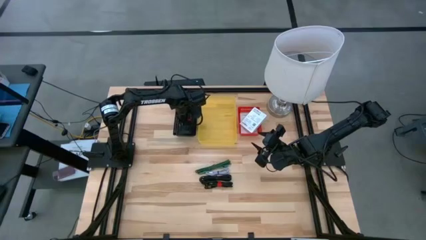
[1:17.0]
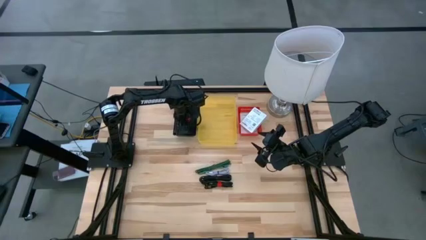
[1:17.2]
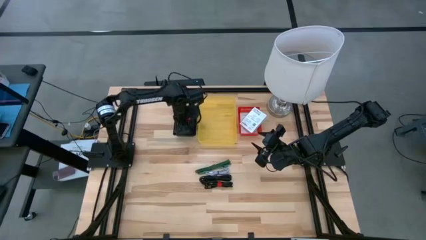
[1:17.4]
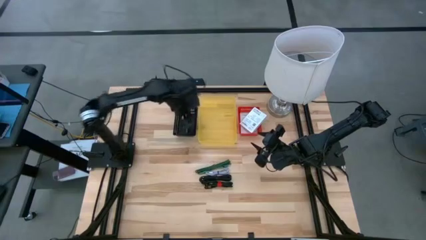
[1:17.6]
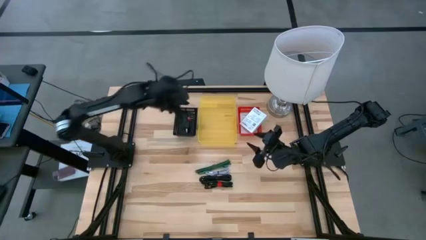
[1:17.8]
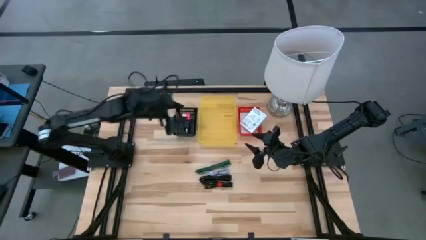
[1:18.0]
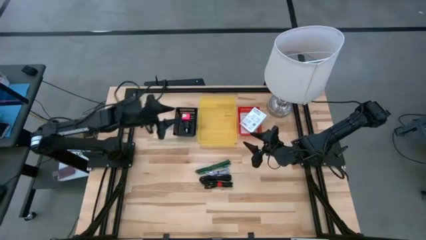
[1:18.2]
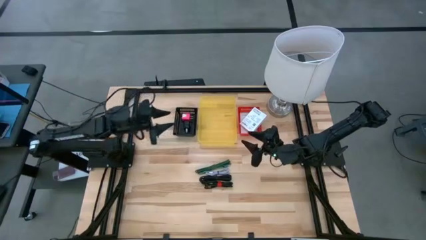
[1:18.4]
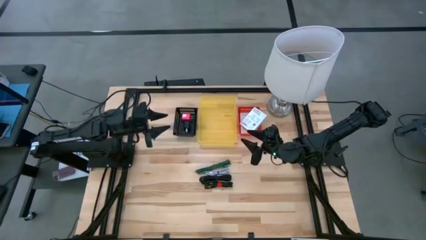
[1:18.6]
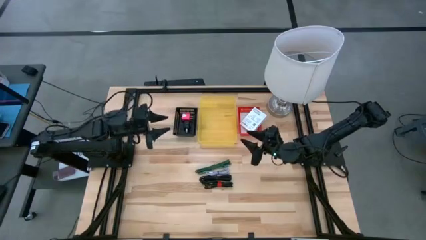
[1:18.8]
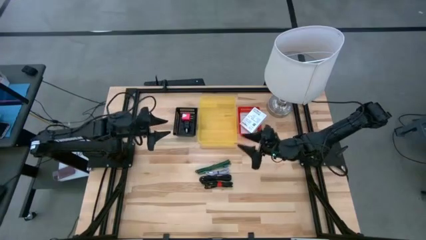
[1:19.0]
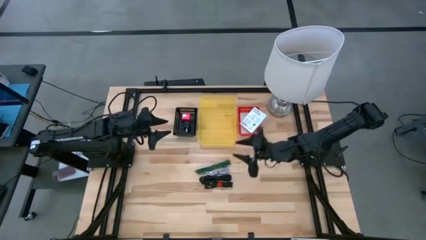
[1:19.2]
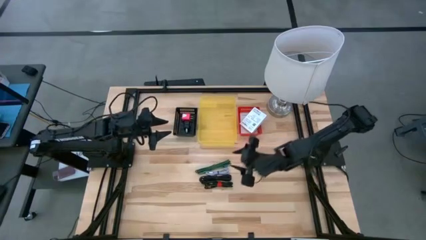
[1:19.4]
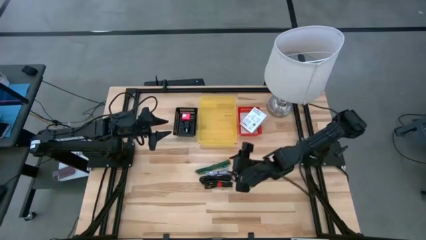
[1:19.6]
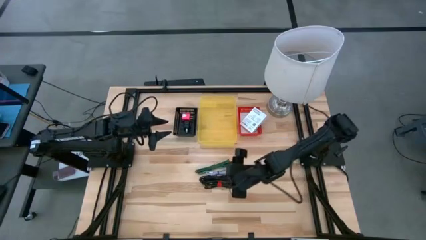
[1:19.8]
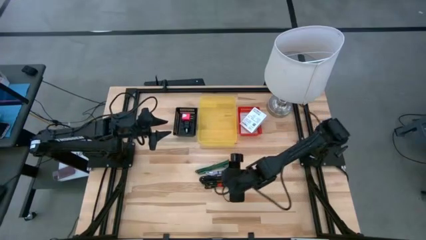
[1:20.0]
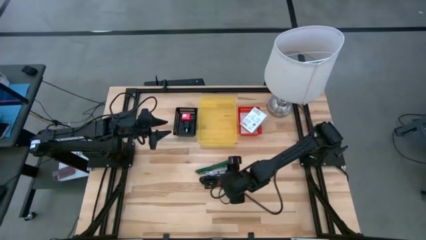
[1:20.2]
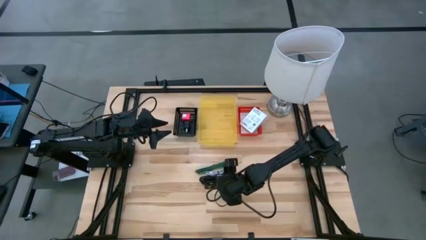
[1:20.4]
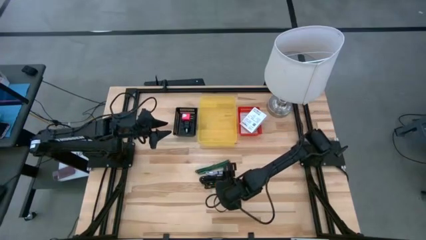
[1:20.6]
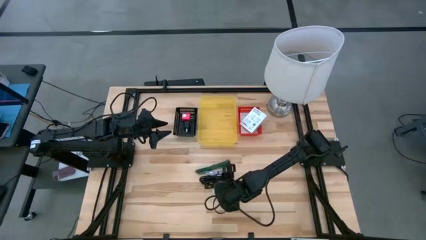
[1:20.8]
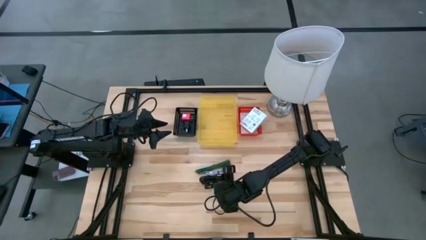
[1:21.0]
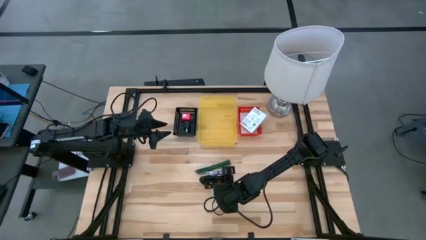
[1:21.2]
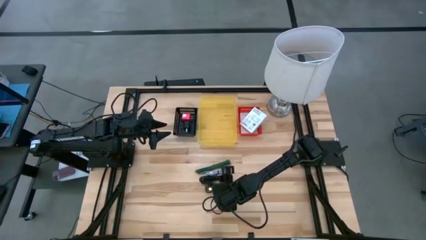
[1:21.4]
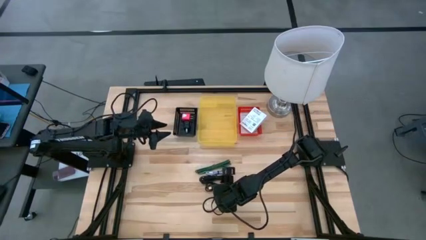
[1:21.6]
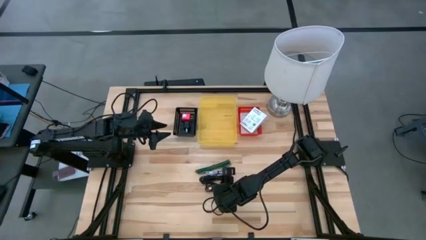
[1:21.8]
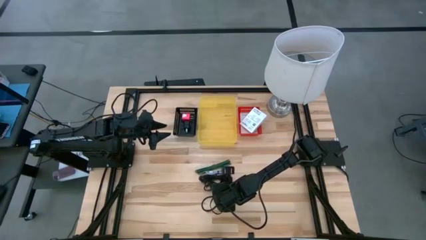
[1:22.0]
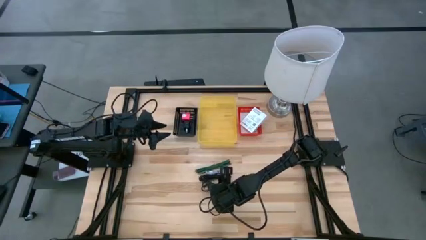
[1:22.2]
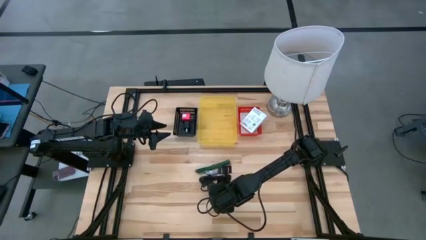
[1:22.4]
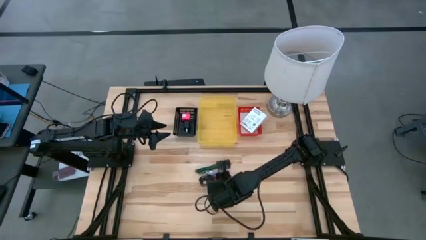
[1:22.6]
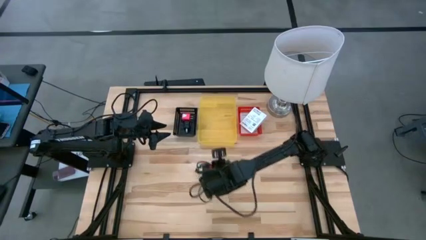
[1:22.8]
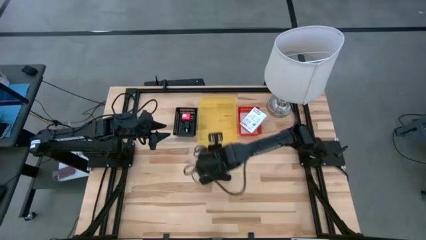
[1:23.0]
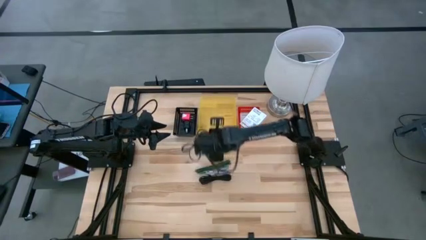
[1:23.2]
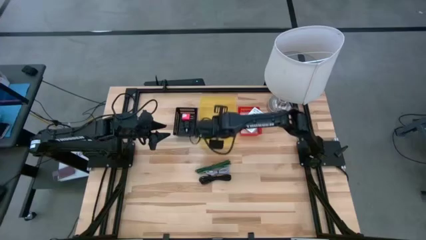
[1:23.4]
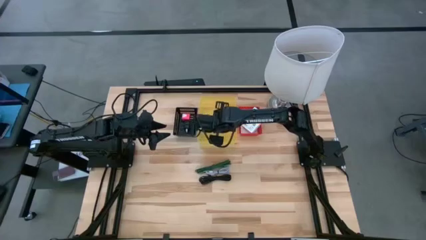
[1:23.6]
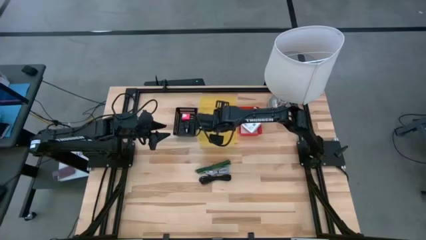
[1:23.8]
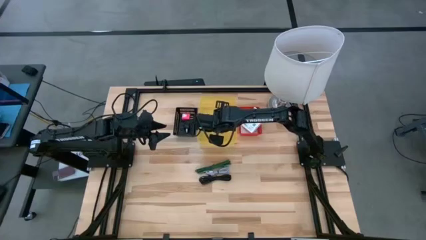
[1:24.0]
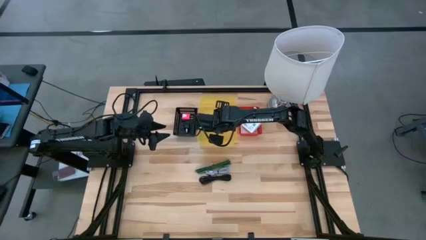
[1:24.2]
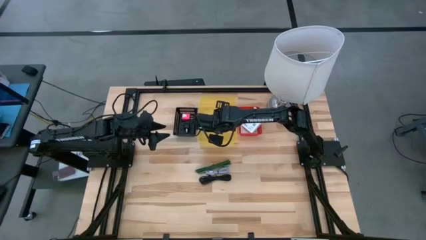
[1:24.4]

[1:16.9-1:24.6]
Task: Pick and place items into bin
Put the bottom black charger cable into the yellow bin

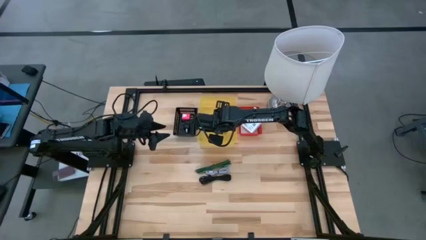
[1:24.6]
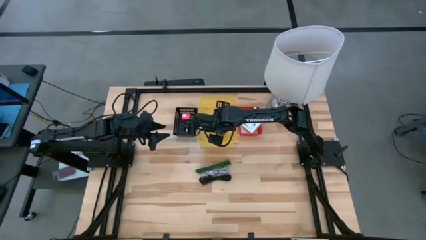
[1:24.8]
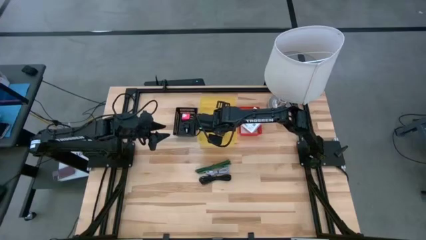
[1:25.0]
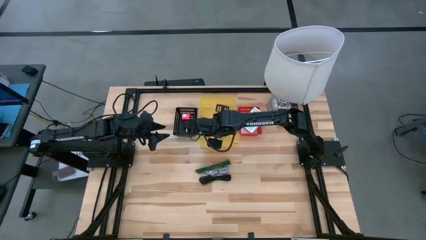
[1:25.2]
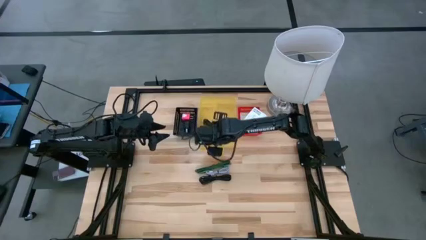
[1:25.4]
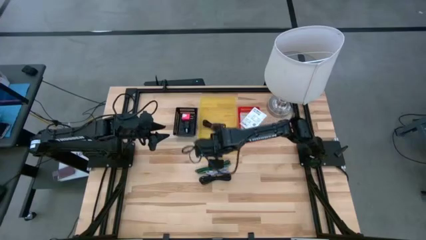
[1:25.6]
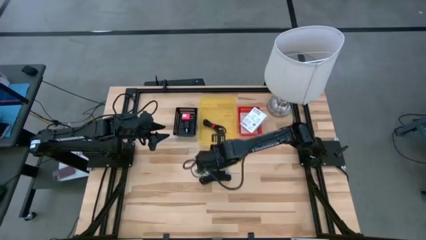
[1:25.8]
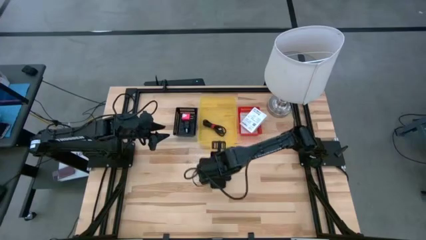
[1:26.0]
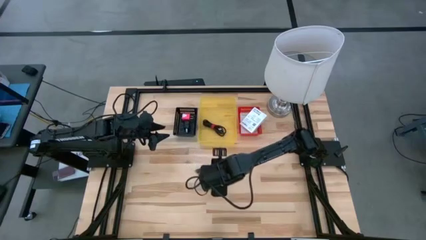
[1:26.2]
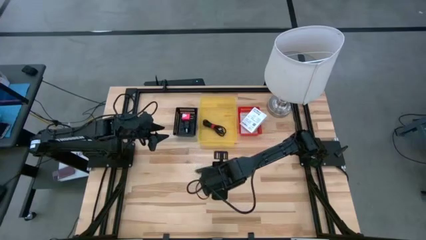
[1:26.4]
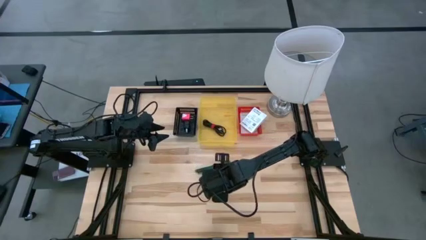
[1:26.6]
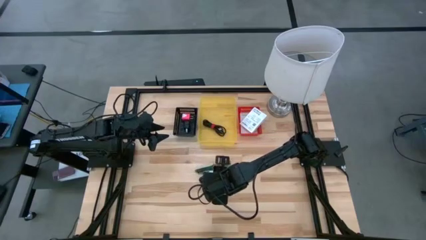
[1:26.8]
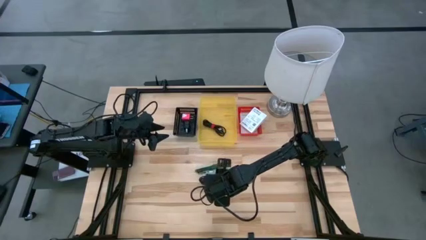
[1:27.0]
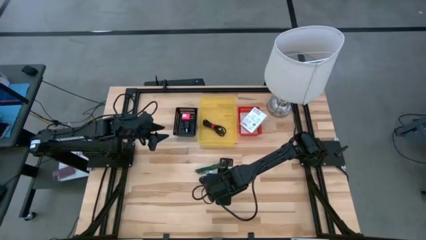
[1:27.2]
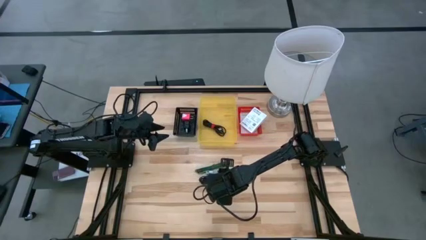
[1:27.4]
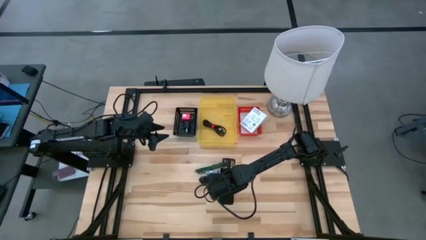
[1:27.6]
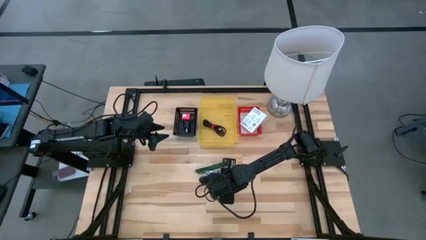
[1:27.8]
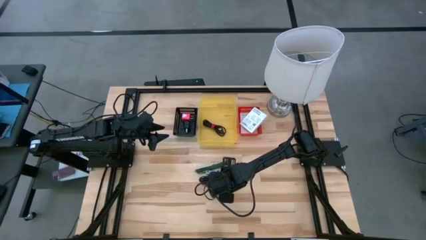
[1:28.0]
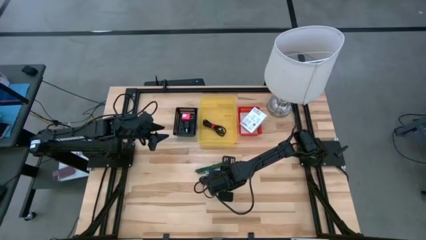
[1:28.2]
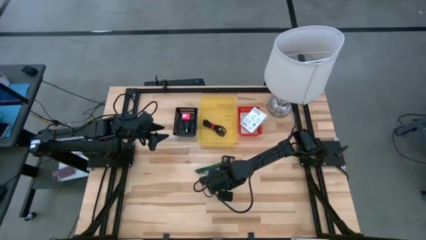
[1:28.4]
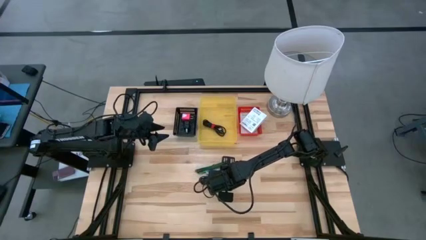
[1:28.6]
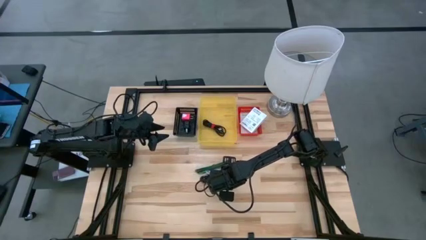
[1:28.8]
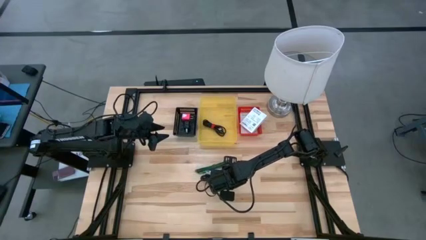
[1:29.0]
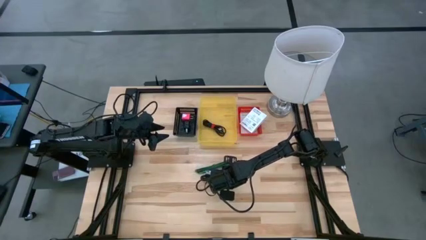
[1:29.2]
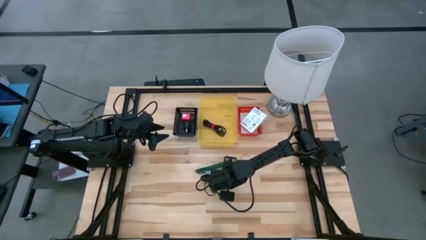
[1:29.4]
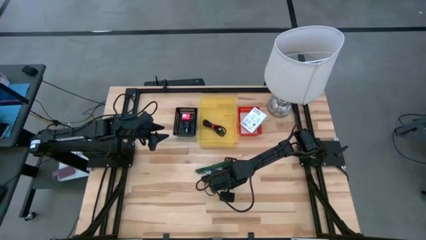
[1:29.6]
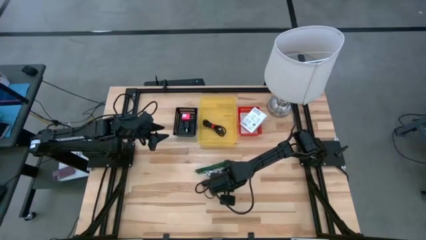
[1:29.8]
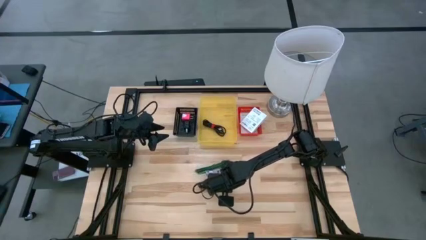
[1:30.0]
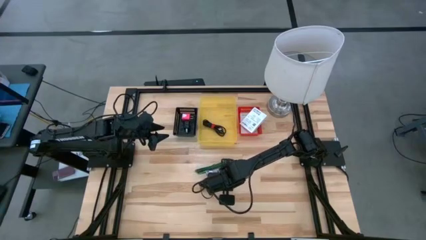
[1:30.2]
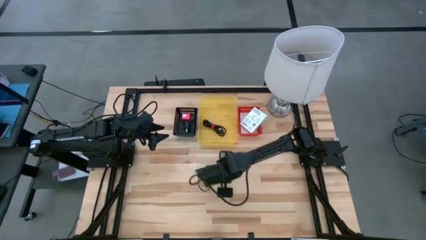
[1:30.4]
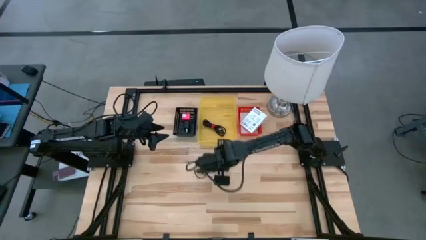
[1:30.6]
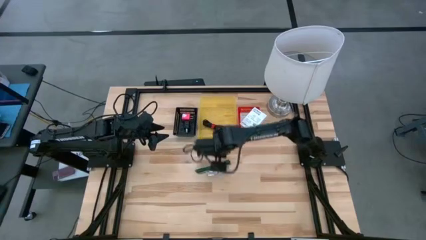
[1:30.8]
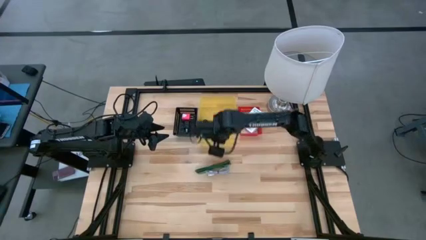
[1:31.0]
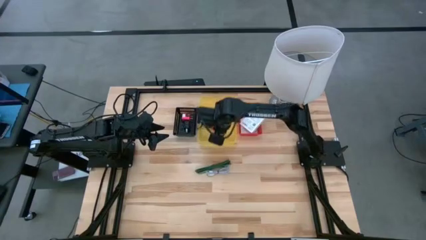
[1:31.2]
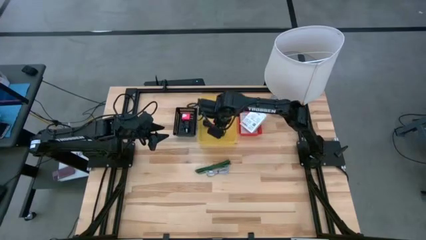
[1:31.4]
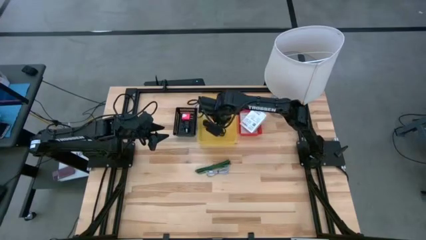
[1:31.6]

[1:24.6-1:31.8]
Put the black charger cable into the yellow bin
